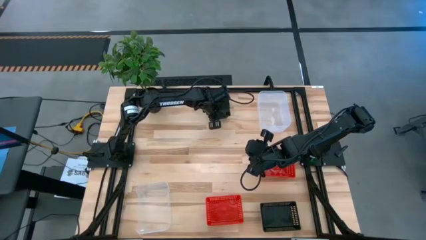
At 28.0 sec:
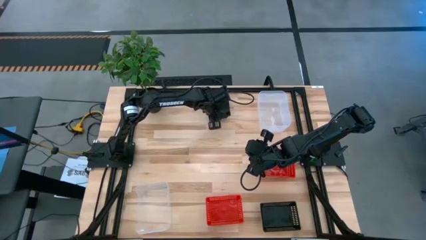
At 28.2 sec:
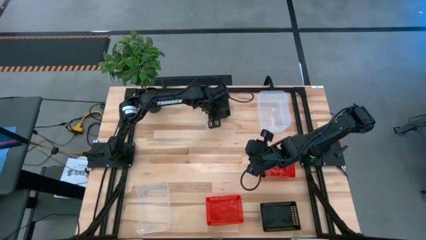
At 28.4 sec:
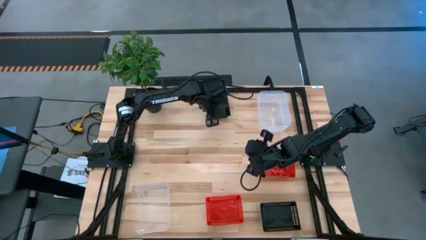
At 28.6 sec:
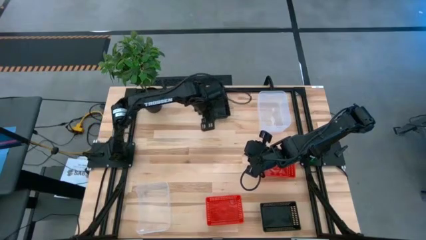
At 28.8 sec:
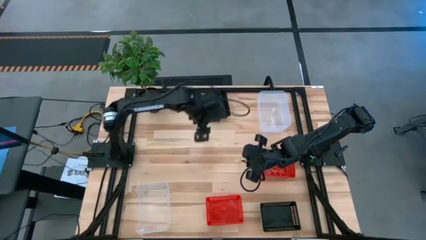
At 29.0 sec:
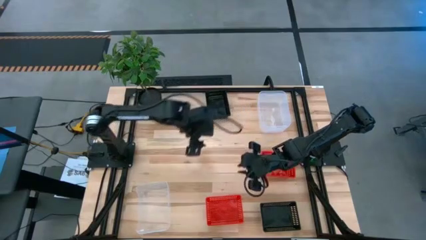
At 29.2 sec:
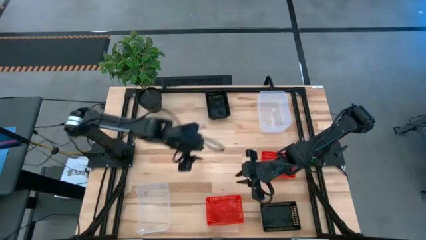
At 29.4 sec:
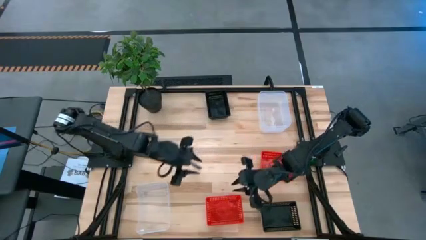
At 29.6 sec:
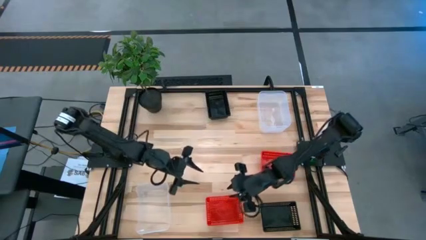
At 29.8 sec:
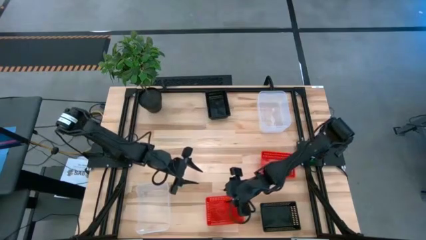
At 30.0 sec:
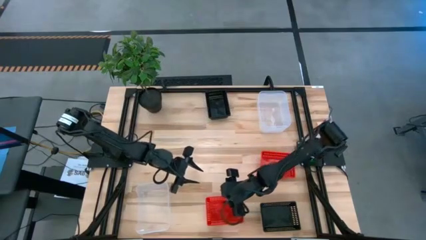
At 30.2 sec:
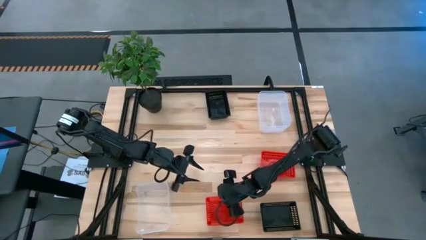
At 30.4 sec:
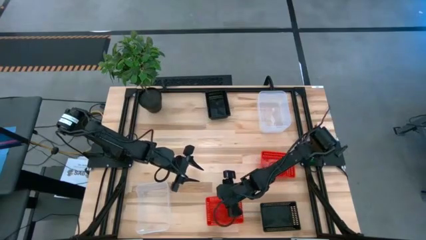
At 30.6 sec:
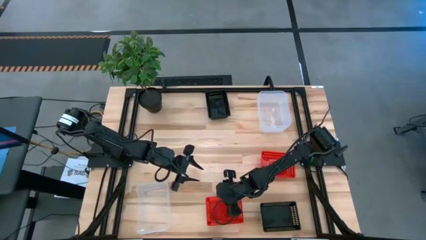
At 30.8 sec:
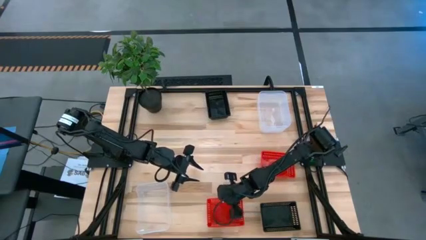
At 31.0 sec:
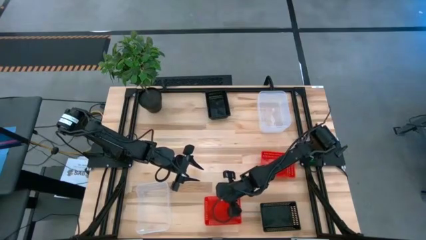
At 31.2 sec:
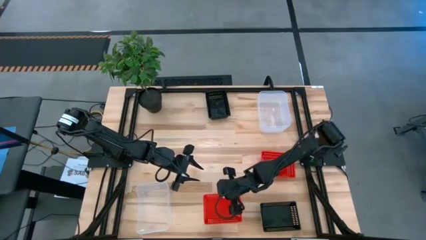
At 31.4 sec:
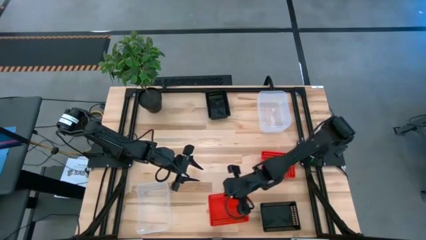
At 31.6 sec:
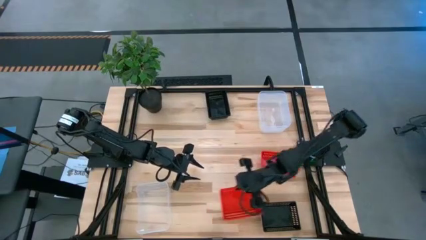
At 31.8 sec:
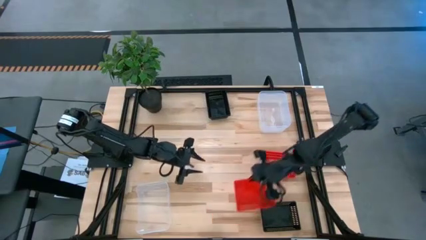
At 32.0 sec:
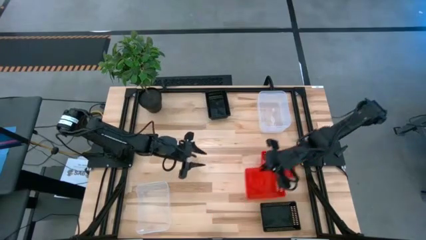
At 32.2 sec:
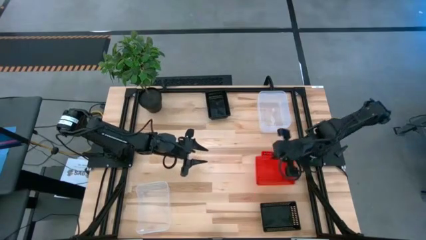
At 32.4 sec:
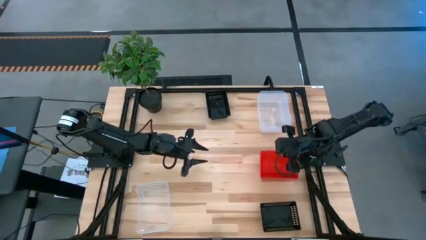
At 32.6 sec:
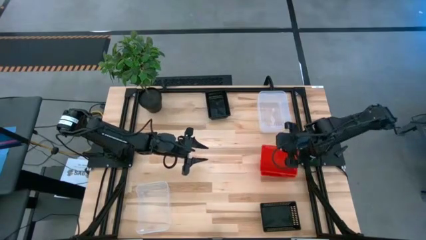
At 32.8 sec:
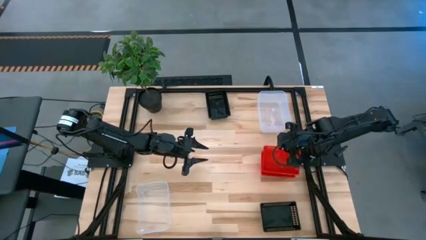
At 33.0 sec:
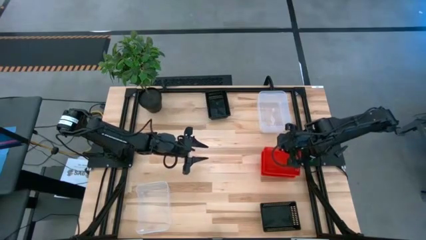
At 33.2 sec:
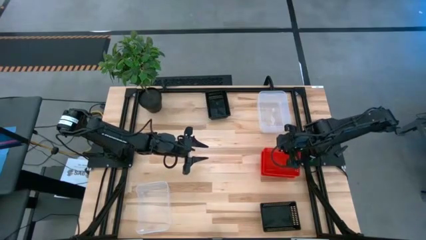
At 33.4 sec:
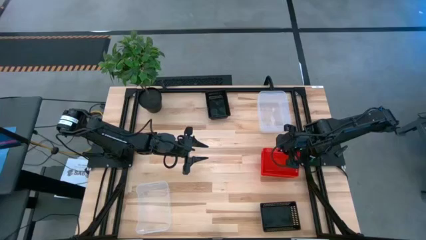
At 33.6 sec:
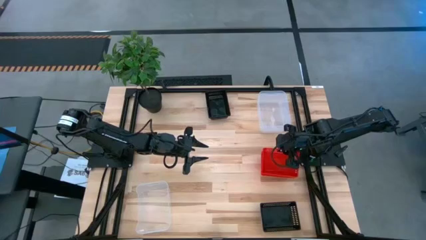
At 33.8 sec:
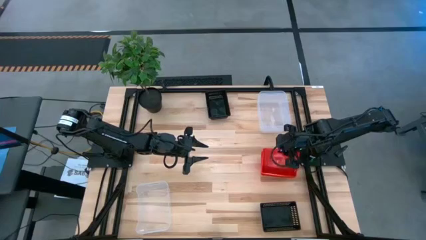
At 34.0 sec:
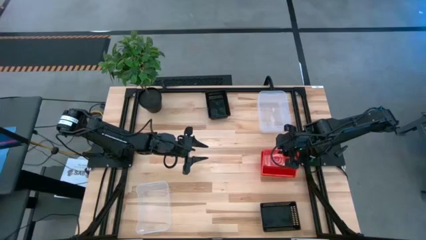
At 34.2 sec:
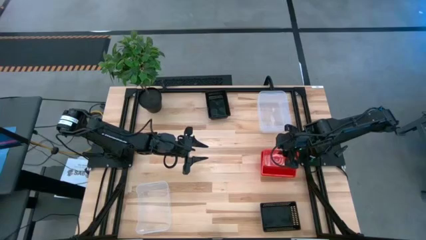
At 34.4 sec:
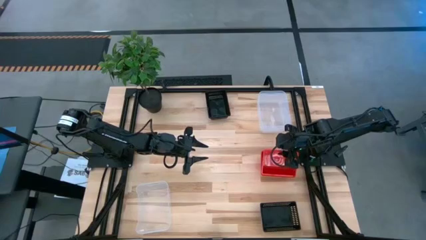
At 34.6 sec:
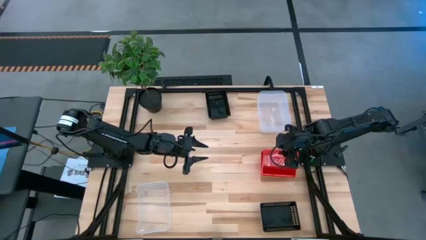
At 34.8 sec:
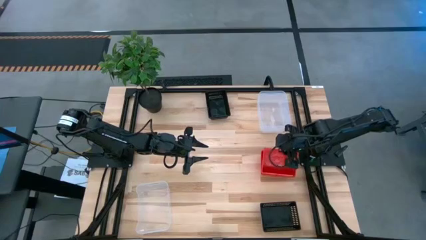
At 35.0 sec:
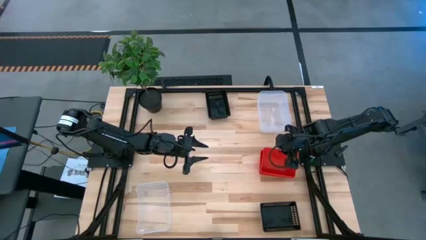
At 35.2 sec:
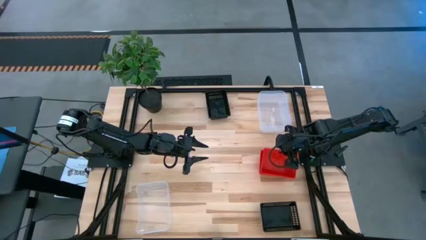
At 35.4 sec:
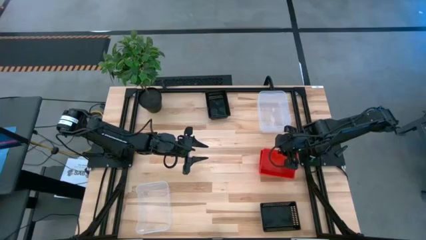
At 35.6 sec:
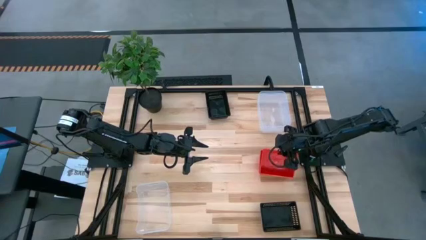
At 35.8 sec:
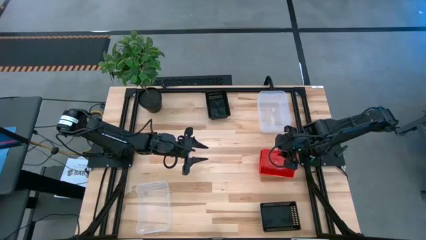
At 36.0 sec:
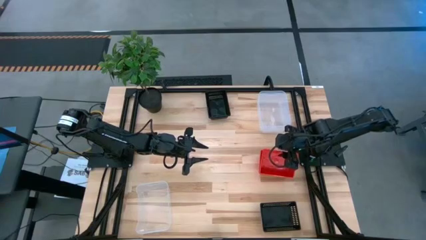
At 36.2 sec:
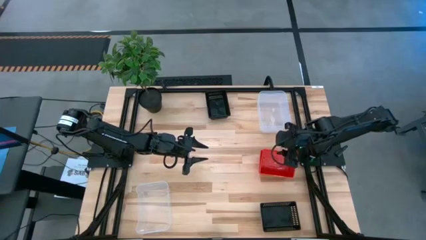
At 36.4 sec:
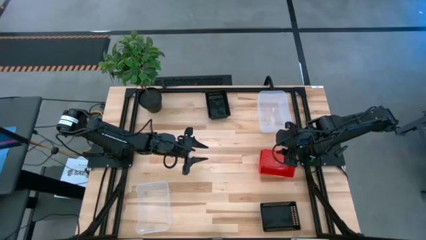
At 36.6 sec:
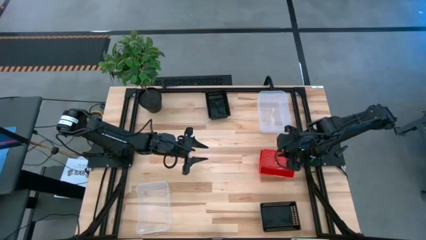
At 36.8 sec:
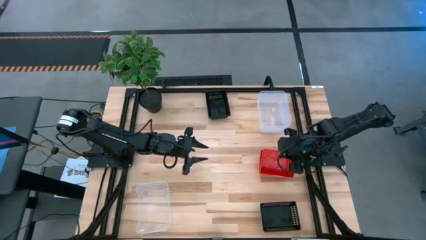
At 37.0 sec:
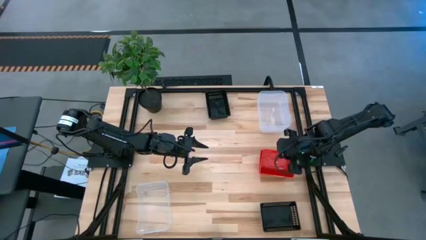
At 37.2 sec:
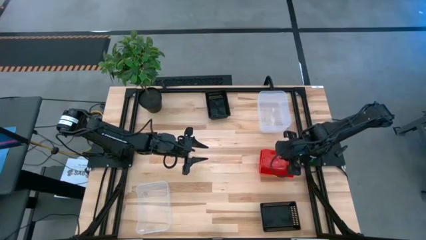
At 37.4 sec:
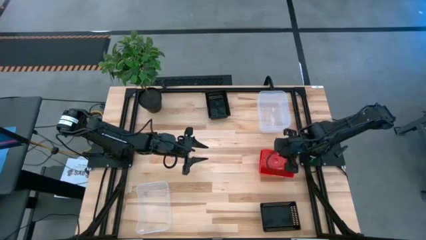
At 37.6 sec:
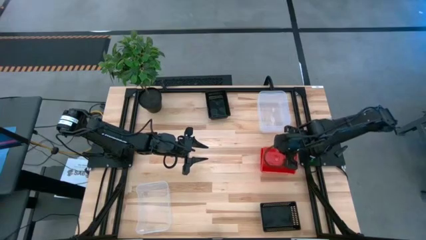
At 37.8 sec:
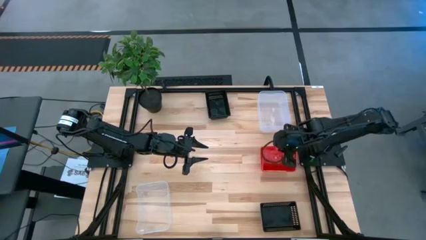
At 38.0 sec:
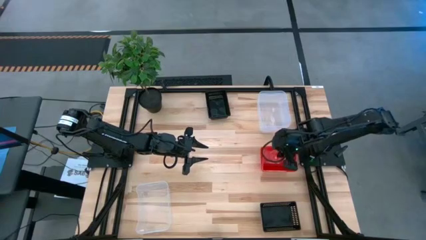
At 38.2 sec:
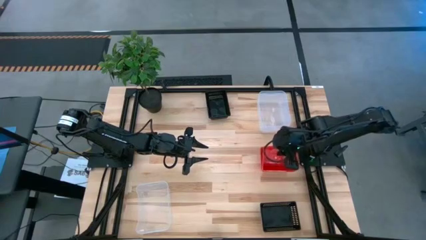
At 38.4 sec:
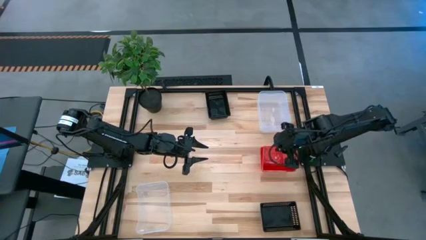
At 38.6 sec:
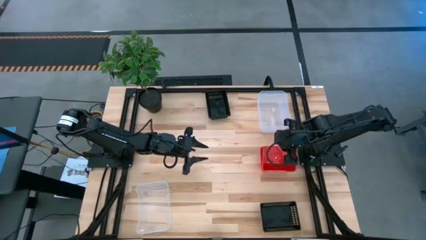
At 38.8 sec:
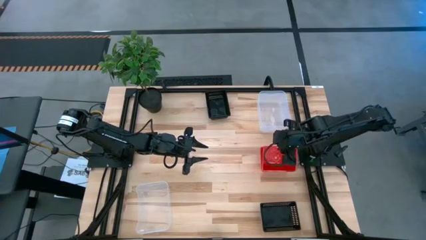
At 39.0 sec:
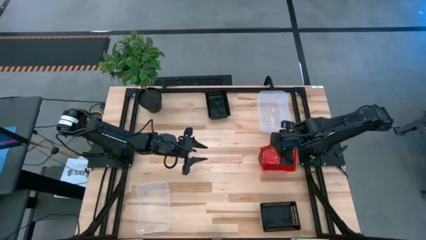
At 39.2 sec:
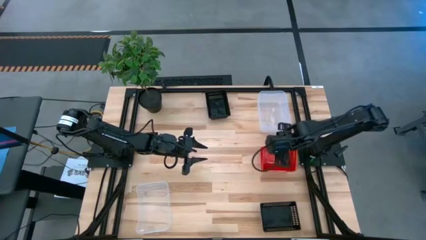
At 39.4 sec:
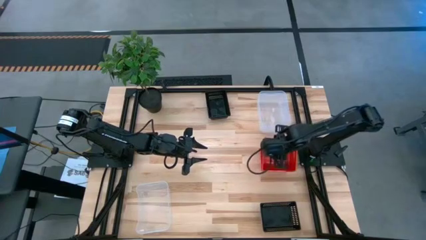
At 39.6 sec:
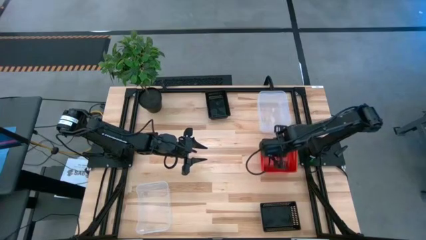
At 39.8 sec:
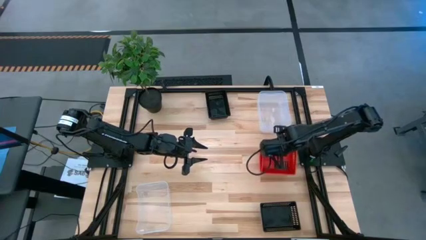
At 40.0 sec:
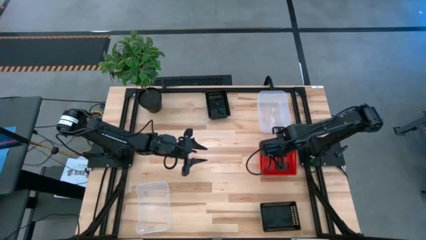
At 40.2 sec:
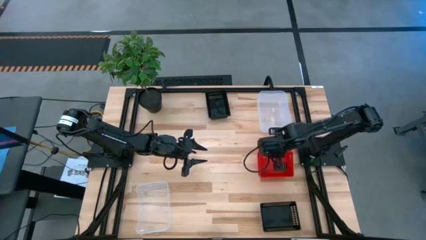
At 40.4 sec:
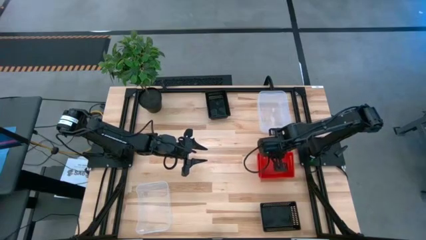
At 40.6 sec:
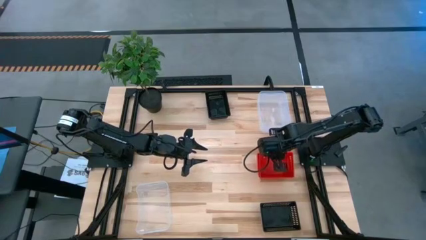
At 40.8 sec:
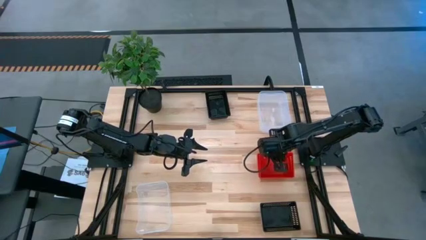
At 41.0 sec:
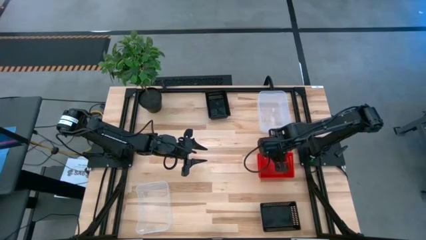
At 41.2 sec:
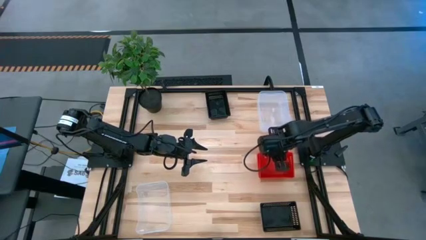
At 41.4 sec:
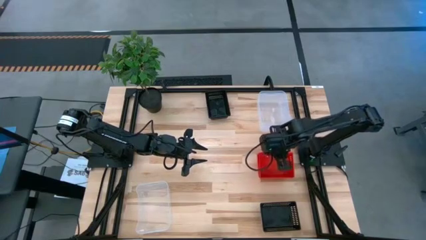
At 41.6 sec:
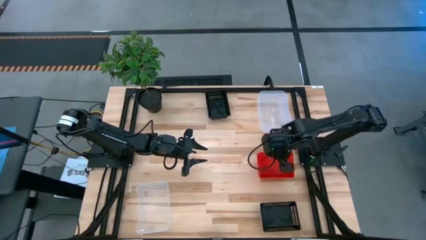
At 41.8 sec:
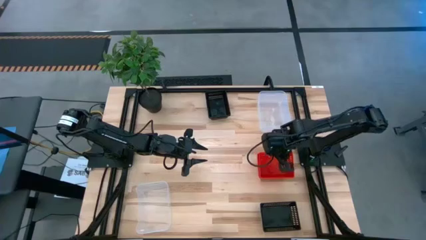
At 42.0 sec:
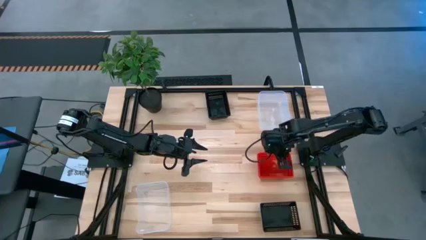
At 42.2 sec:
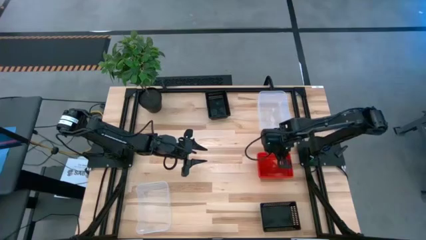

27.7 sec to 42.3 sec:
Stack the bottom red bin on top of the top red bin
